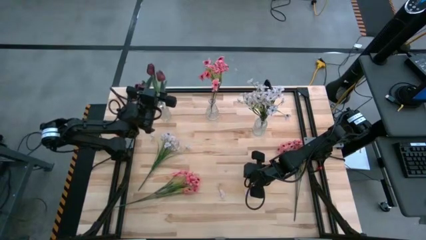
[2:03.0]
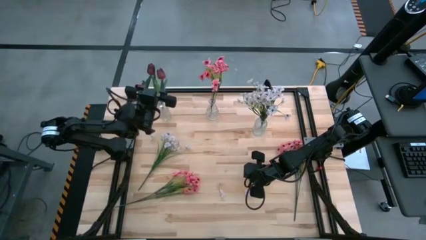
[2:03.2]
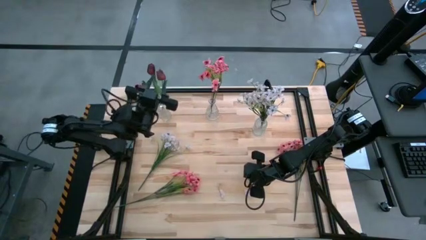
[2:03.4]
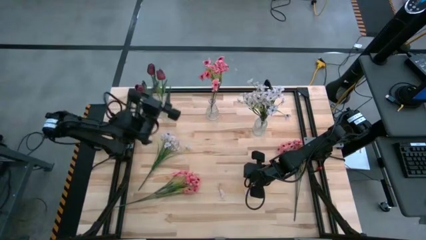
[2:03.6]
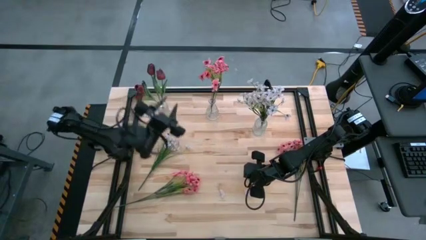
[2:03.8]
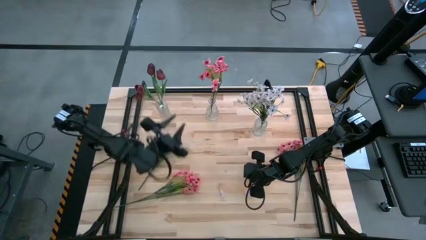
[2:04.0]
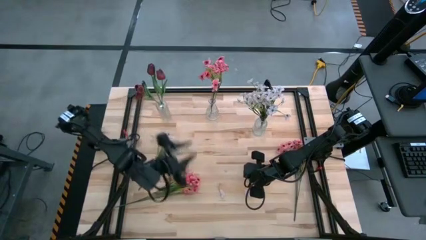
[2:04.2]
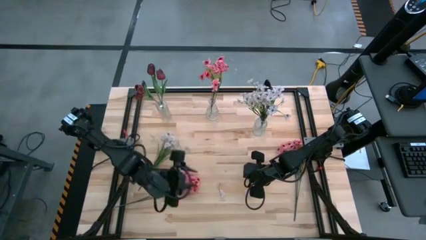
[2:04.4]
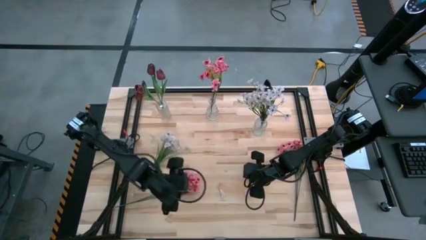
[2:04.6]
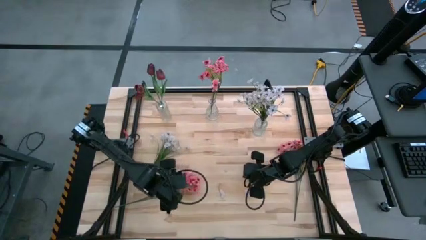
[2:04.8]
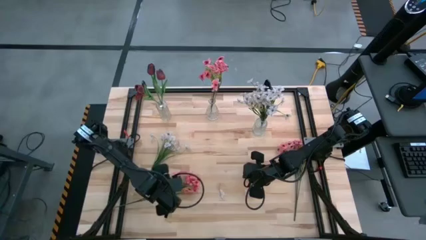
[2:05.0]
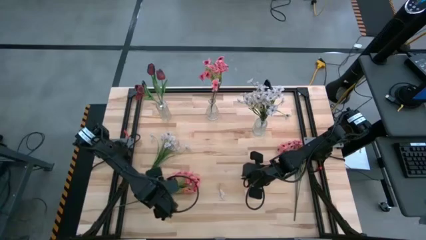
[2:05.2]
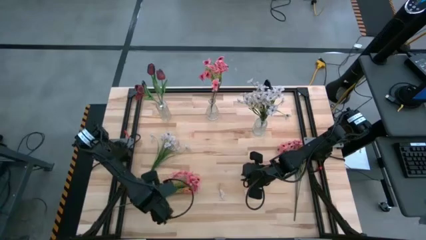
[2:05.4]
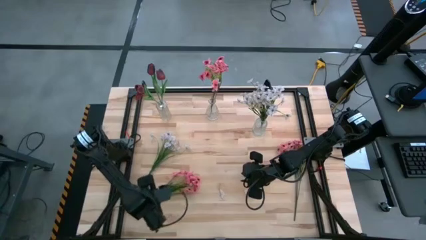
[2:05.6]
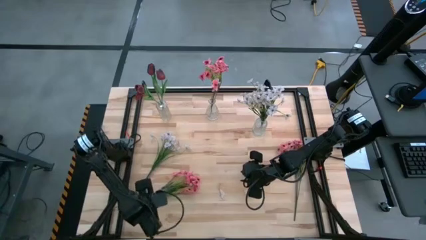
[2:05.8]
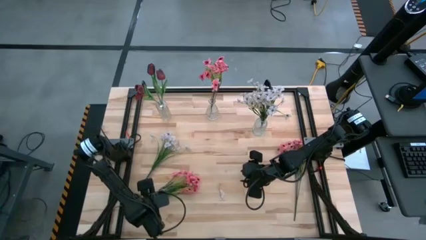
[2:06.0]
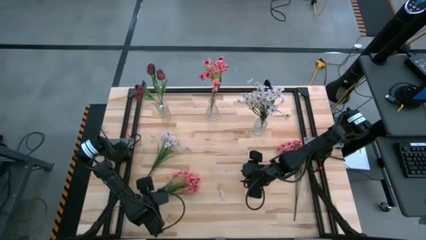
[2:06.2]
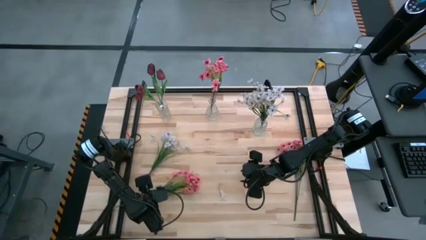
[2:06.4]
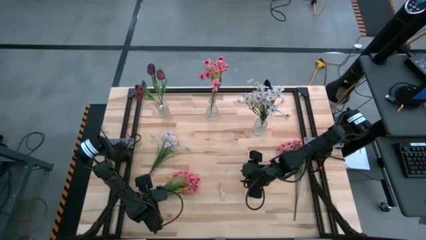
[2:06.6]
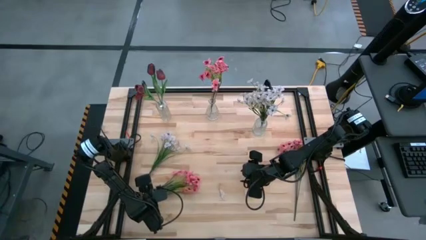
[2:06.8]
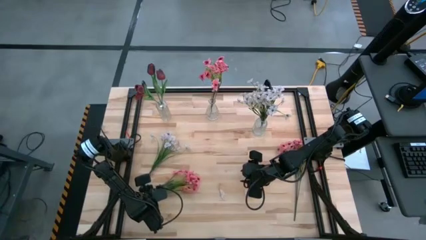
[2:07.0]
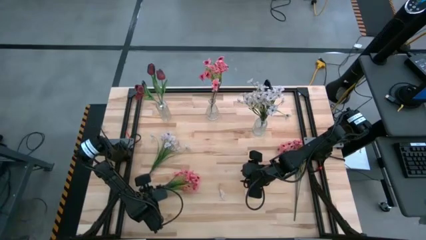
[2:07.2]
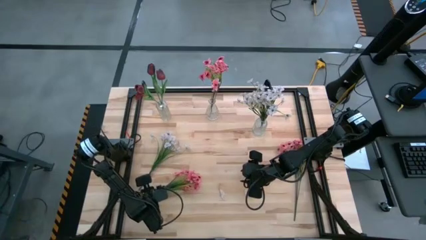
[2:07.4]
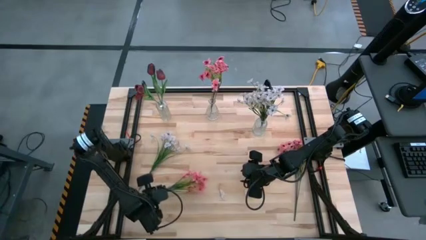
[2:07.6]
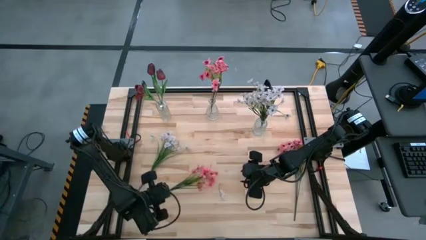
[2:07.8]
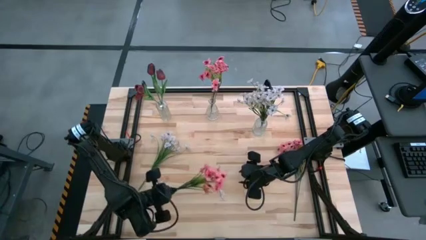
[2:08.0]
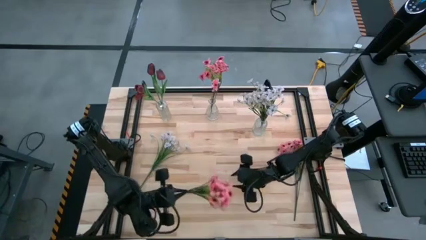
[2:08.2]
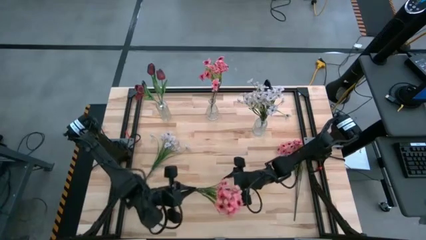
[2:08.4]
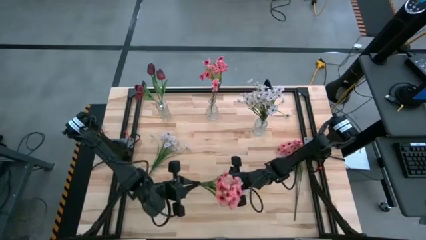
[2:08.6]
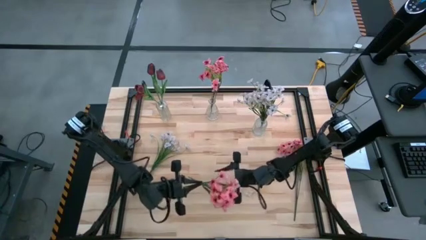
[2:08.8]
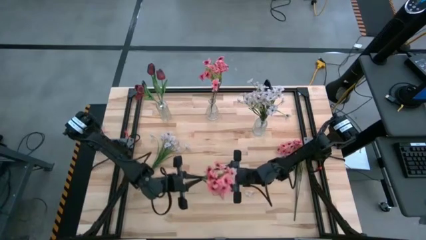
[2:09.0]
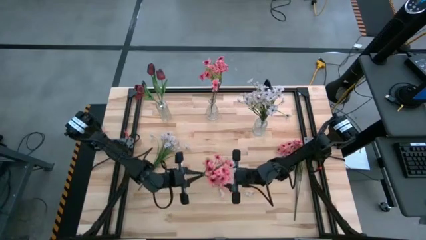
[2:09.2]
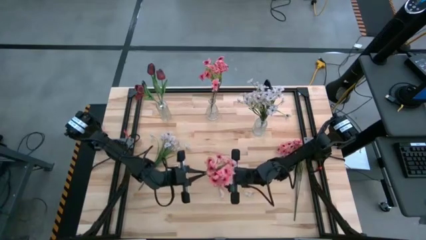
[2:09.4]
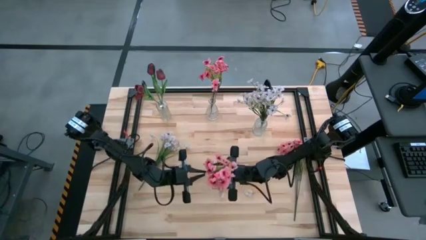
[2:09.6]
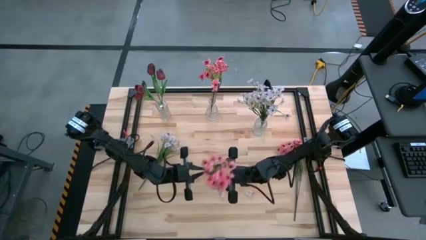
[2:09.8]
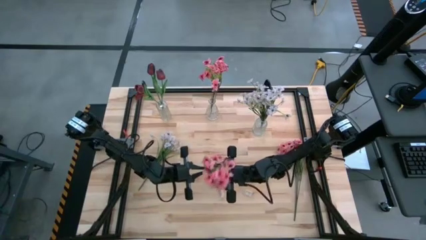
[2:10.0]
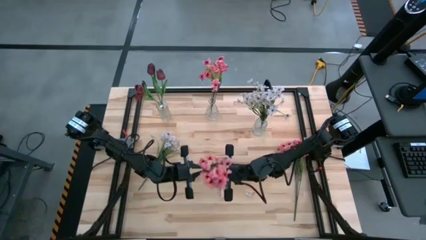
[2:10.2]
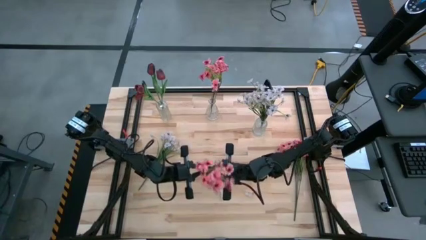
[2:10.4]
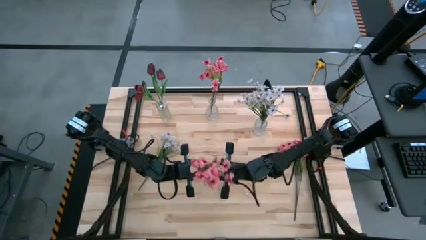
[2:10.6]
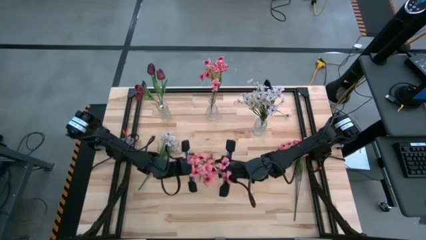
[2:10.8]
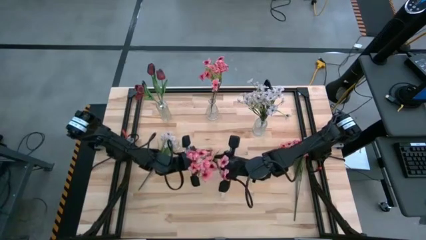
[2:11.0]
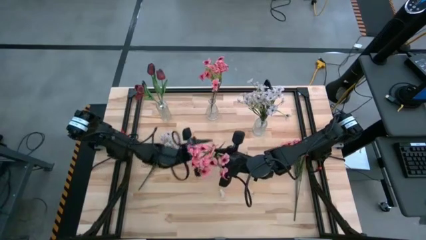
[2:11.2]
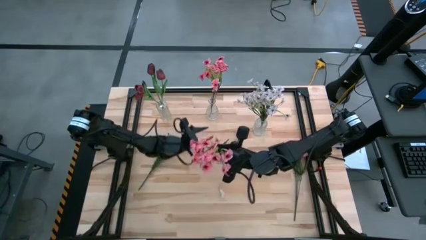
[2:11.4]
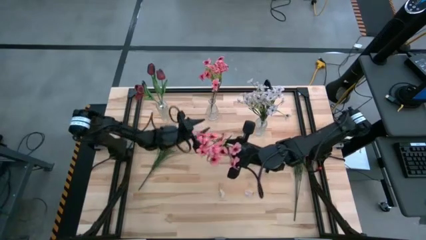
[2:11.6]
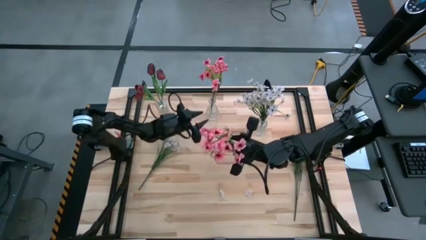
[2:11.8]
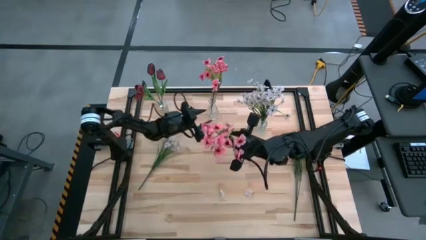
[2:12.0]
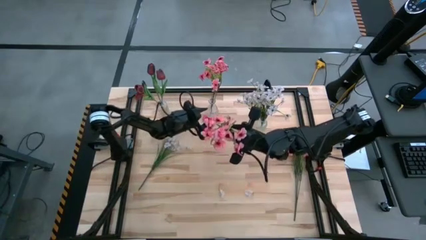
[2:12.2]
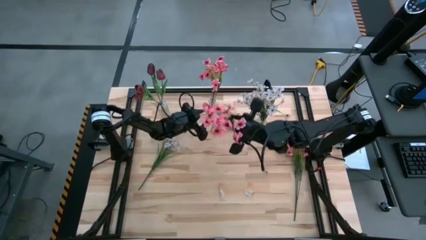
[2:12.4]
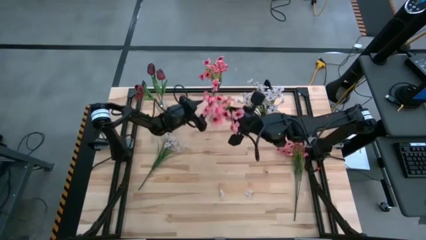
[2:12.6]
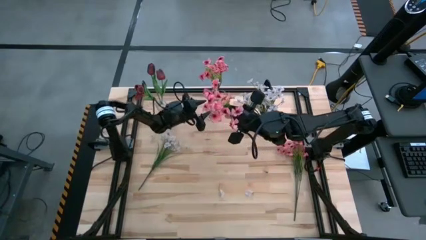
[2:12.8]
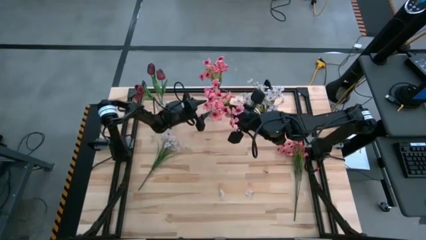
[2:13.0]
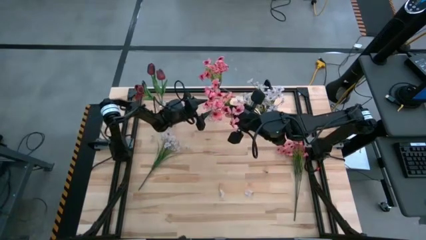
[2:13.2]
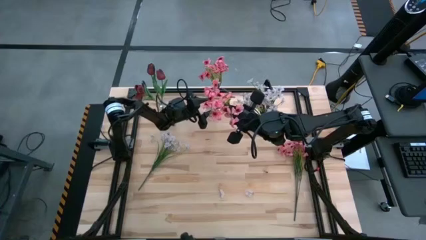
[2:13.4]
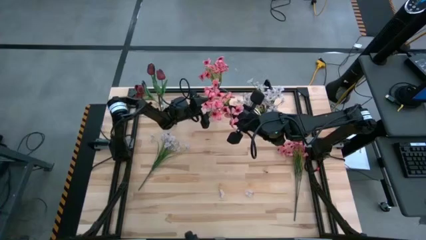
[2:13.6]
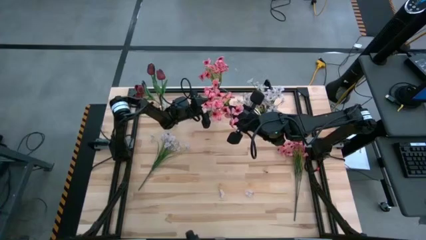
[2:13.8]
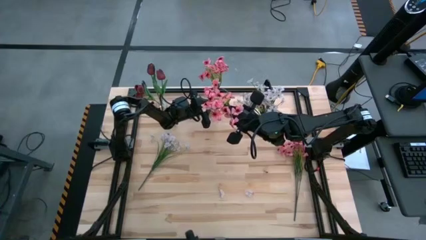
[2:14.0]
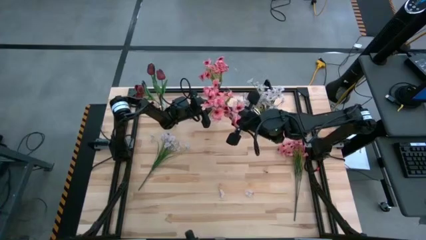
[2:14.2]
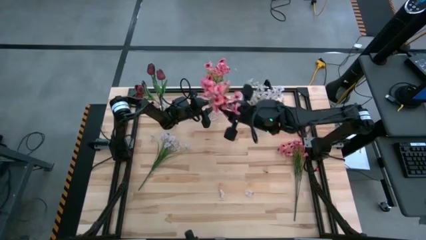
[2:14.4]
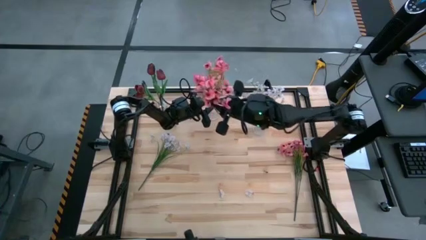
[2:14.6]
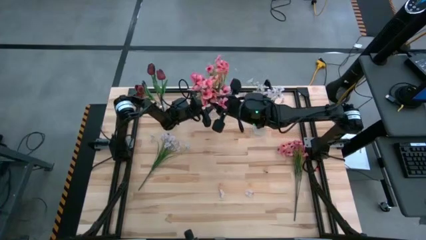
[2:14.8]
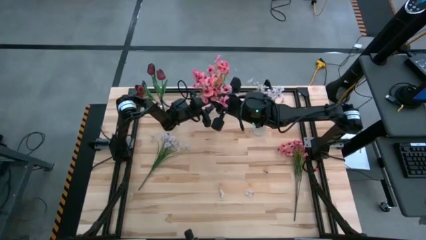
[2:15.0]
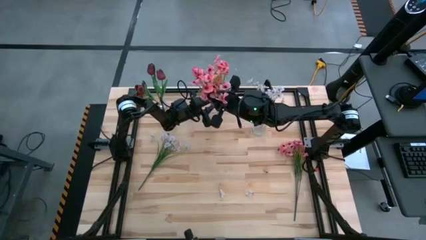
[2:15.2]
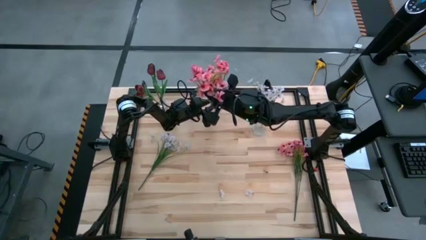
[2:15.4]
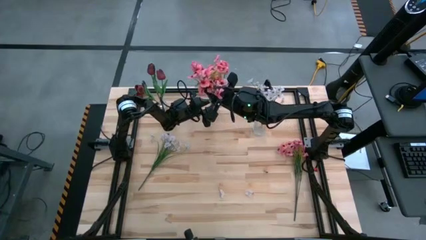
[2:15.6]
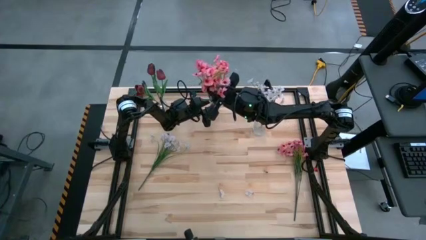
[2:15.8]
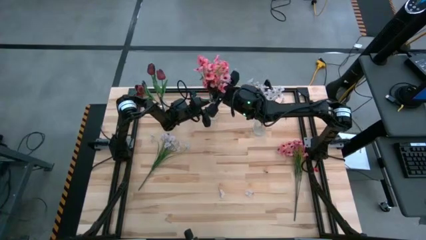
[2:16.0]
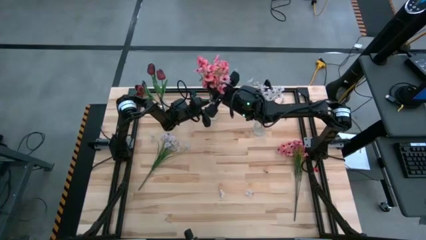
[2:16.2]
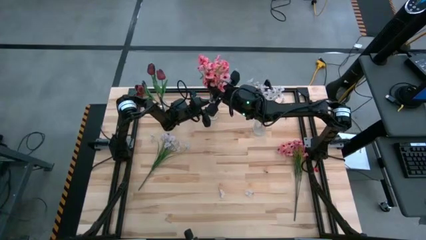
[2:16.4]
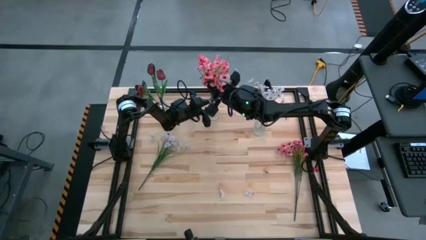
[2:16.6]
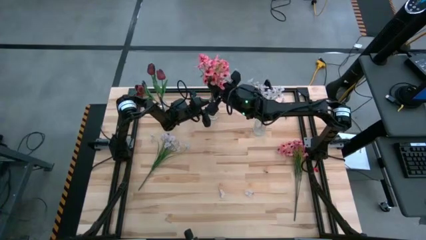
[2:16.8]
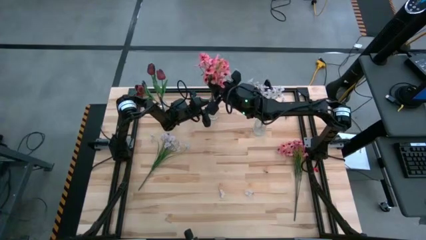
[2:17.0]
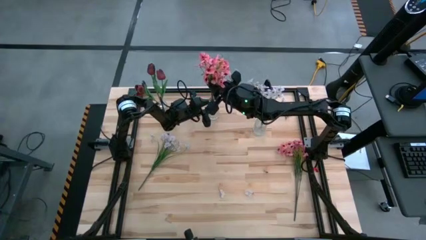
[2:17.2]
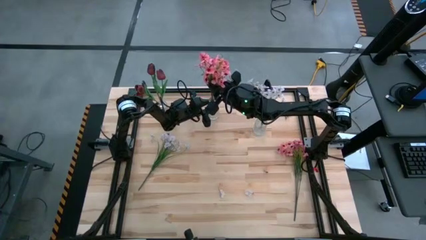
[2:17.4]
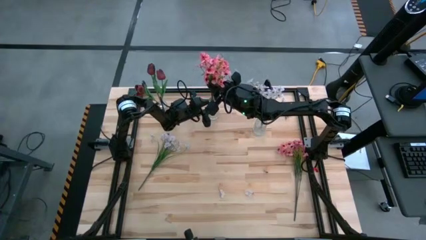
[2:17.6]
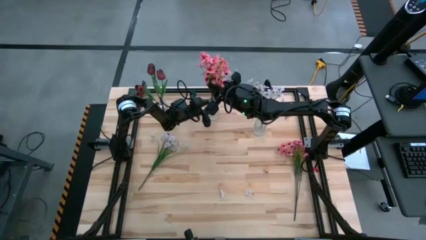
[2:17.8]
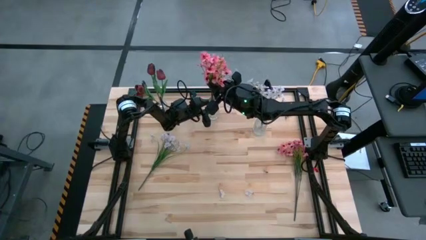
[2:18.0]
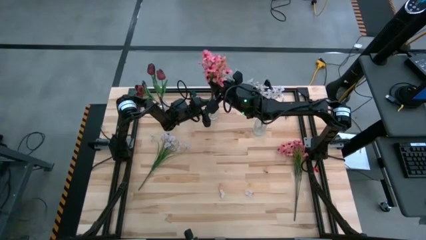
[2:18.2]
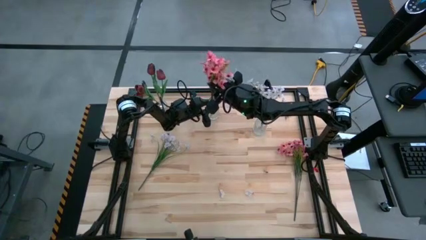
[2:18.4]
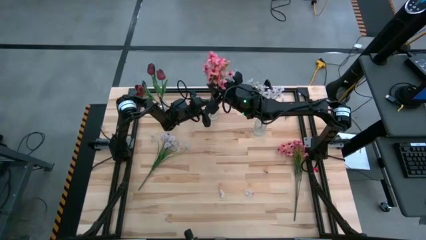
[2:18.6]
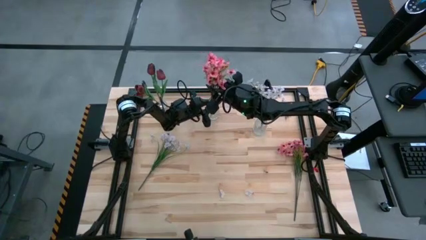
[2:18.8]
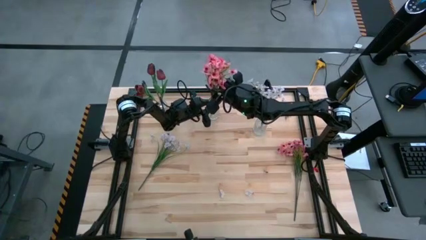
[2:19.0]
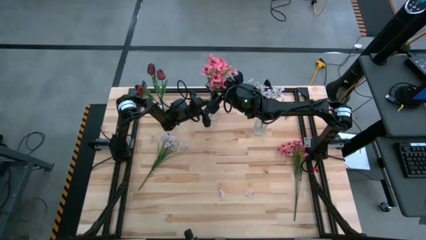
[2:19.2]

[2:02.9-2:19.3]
Task: Sort flowers into vase by color
Put the left pink flowers into the middle transparent vase
